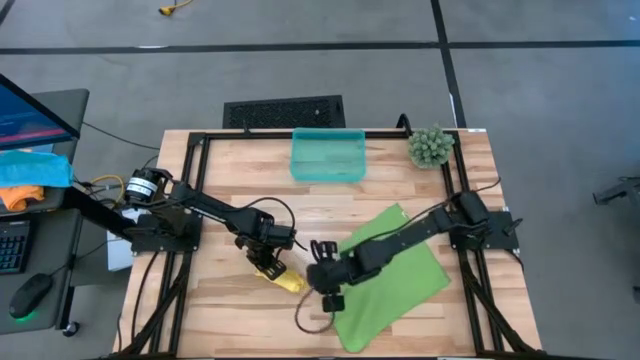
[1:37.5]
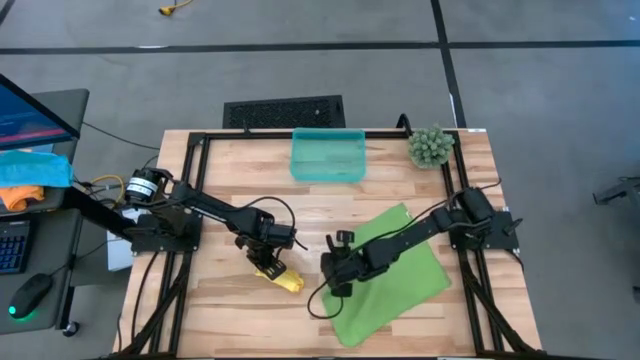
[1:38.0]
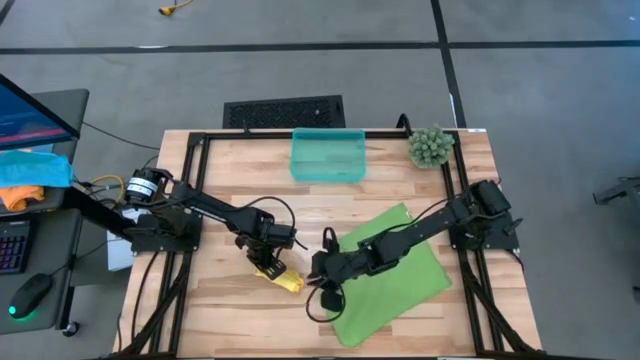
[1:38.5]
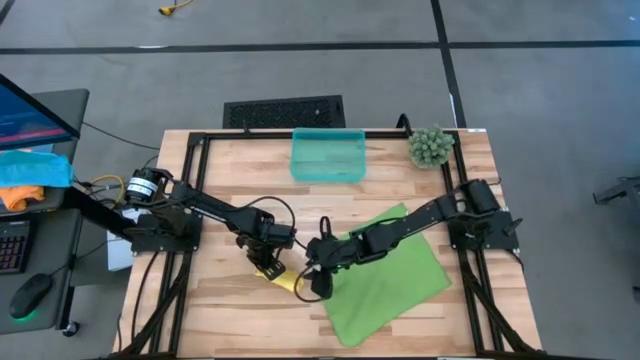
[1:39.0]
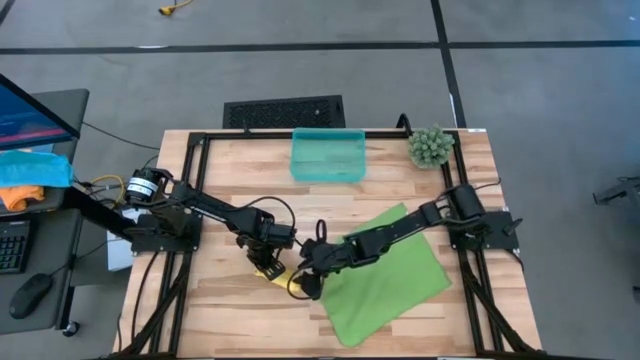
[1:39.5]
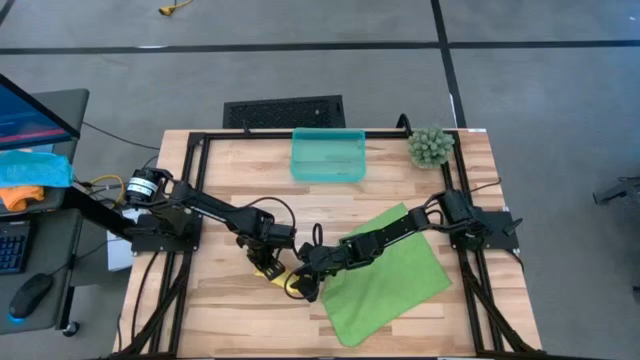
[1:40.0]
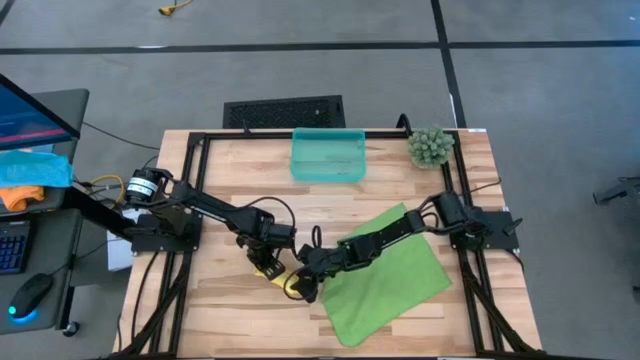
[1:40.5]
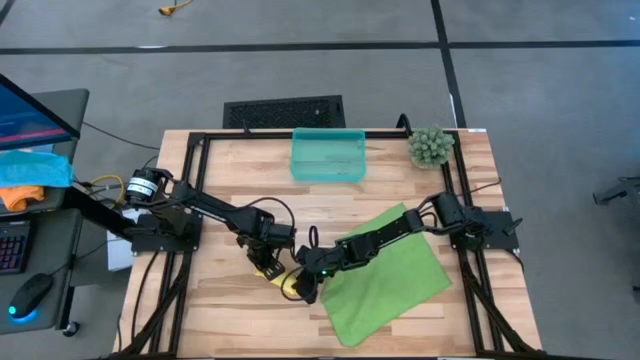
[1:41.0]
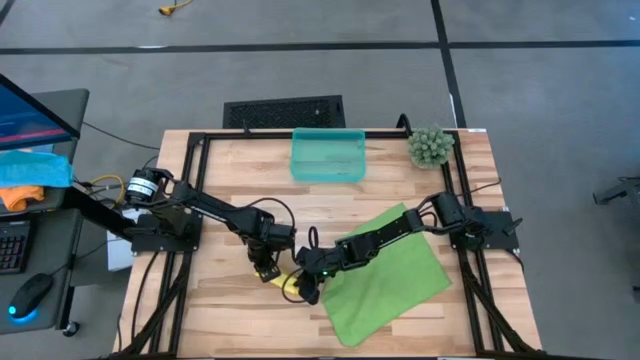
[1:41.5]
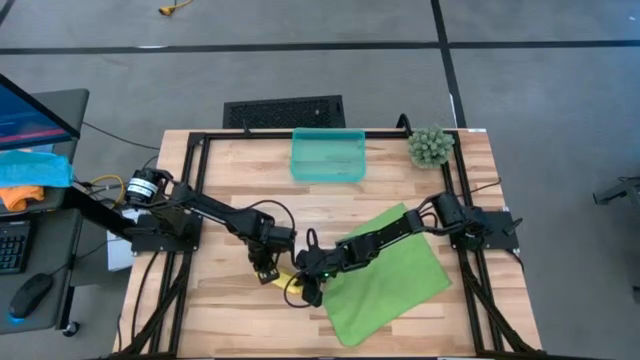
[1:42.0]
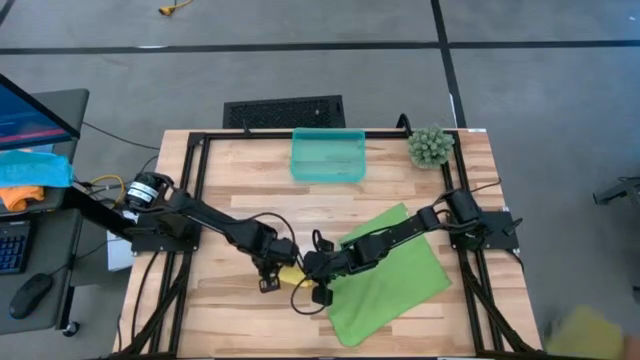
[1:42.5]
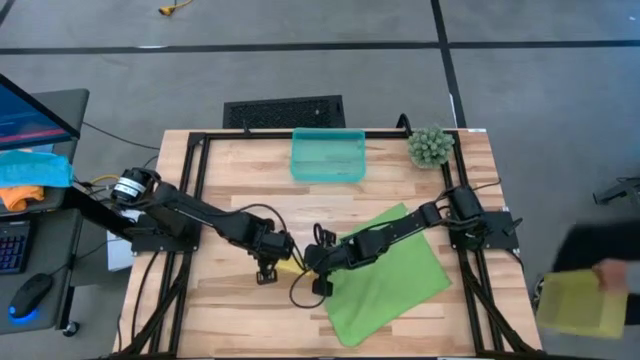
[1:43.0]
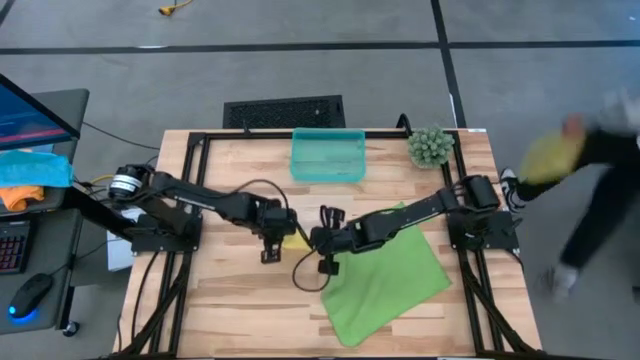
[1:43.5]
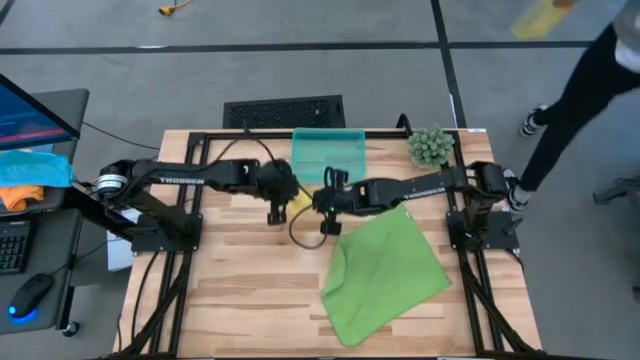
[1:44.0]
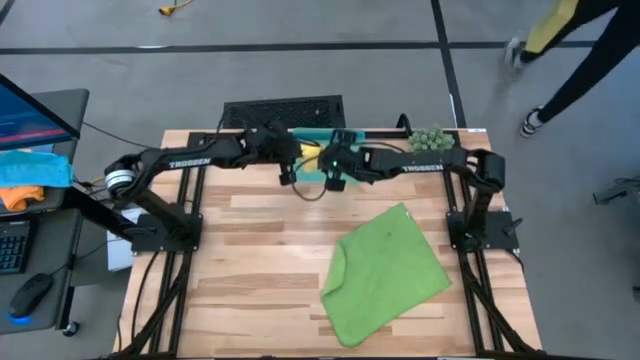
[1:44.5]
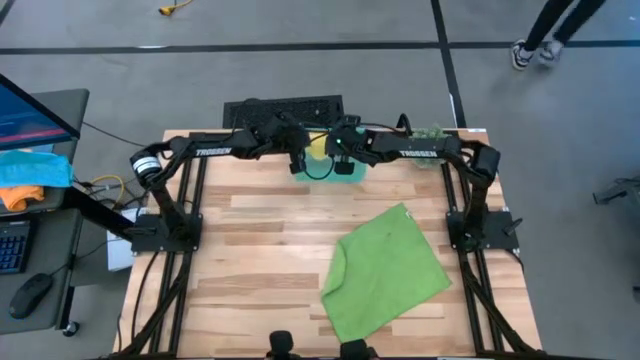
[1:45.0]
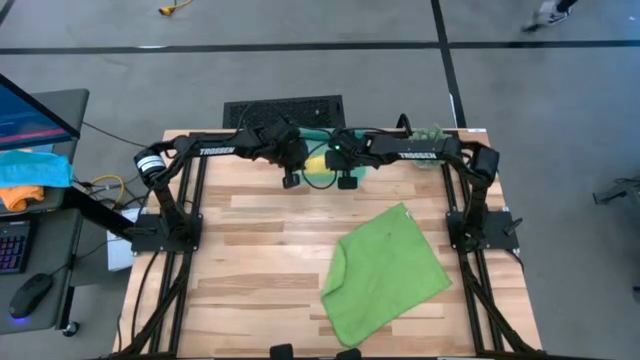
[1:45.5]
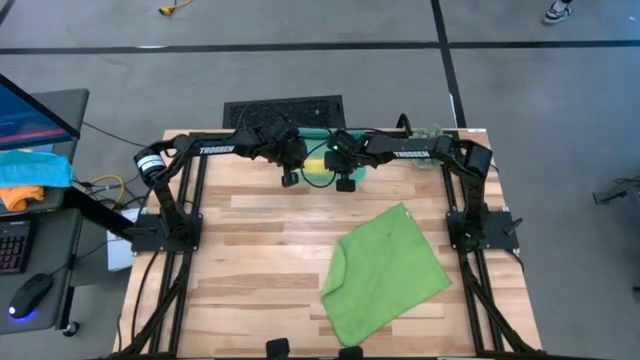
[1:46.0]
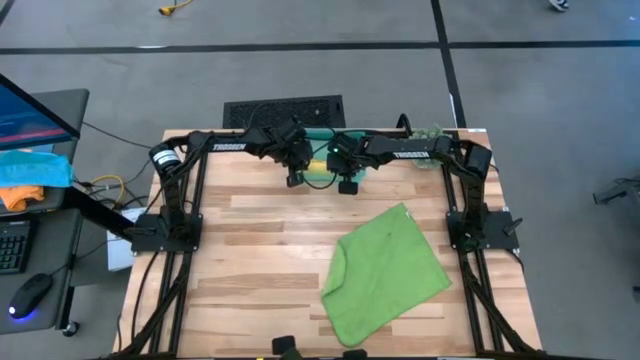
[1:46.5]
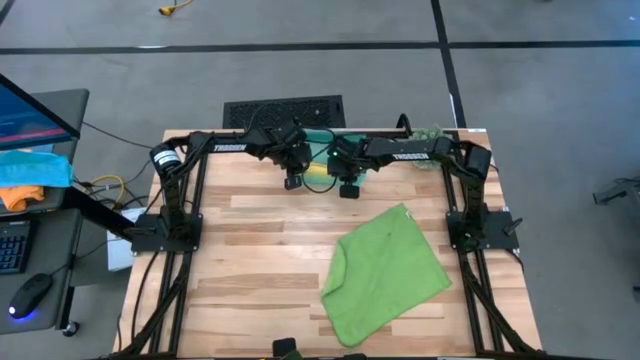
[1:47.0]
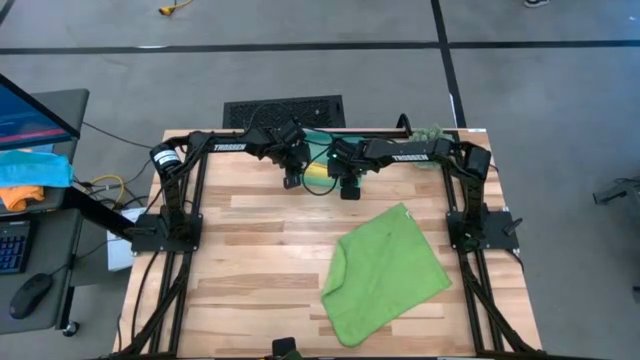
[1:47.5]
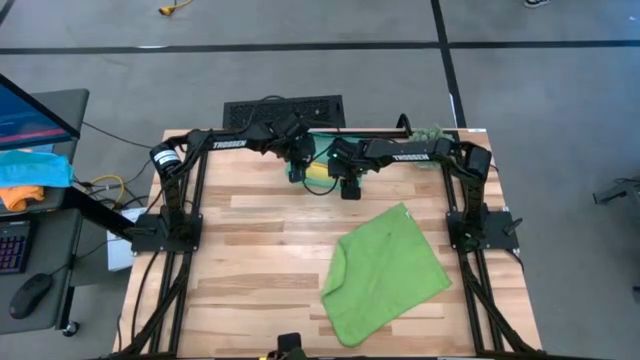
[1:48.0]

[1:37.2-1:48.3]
Task: Roll microfiber towels into tight, uniform cylinder then place into a basket
Put the yellow microfiber towel into the blue bin

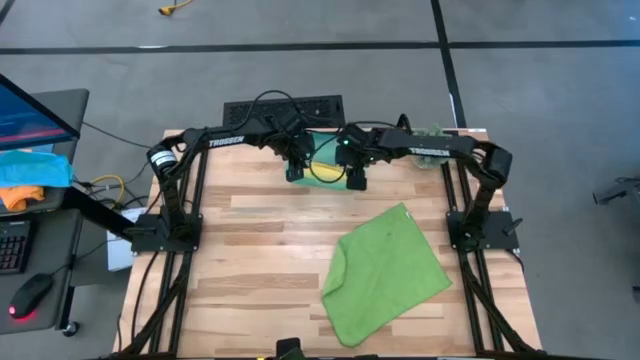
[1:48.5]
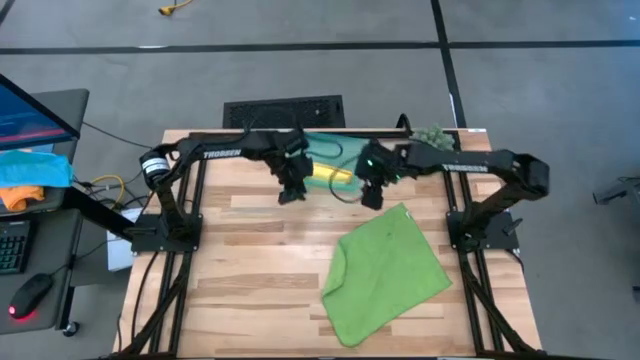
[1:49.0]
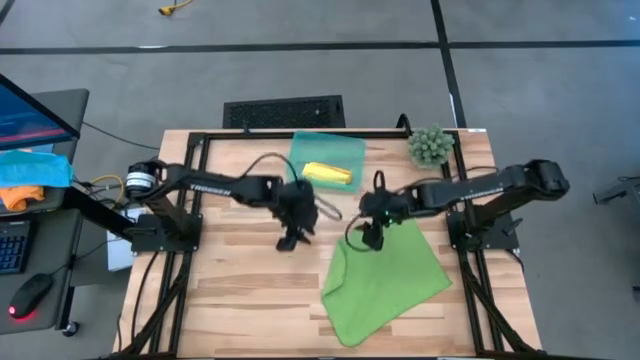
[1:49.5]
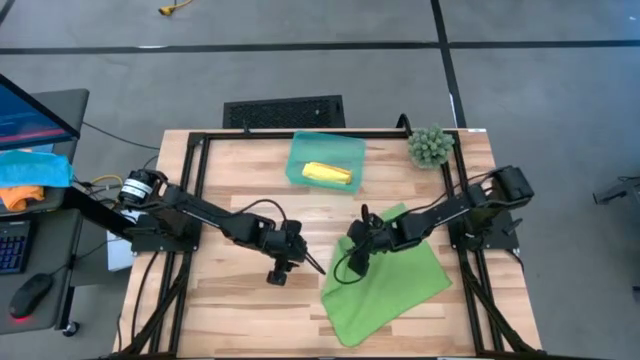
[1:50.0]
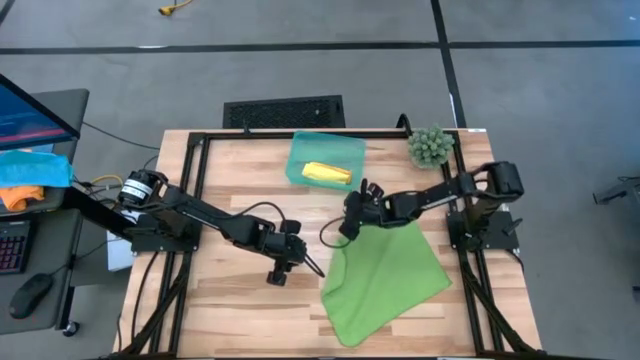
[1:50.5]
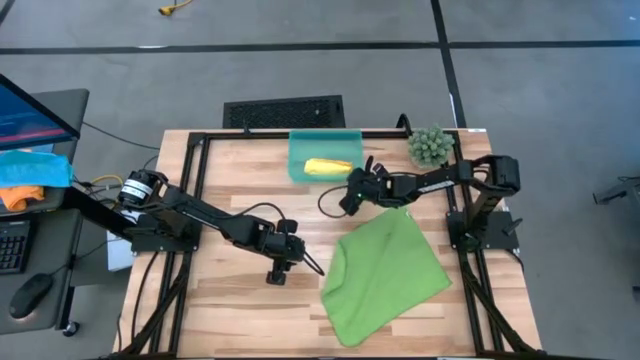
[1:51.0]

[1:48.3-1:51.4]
Adjust the blue bin

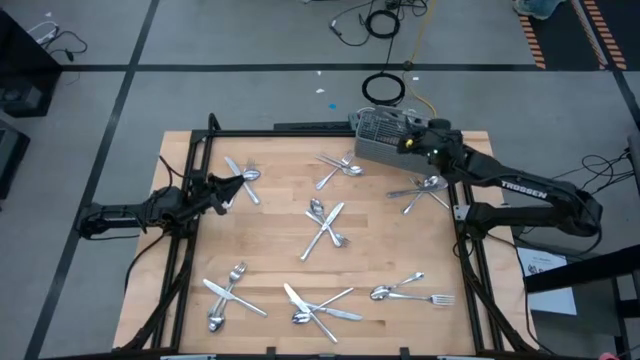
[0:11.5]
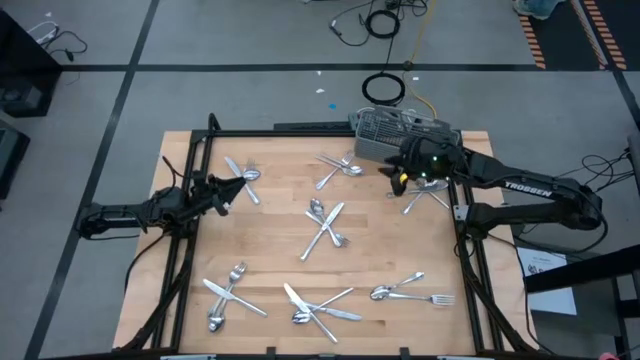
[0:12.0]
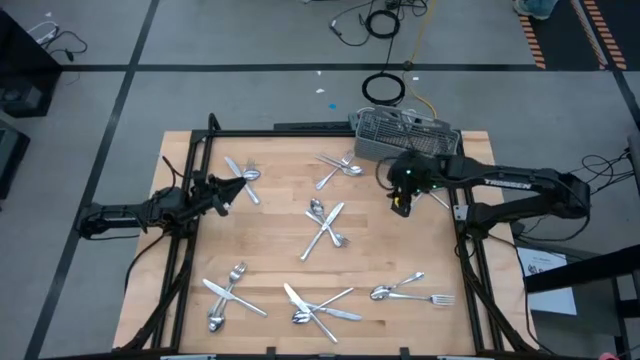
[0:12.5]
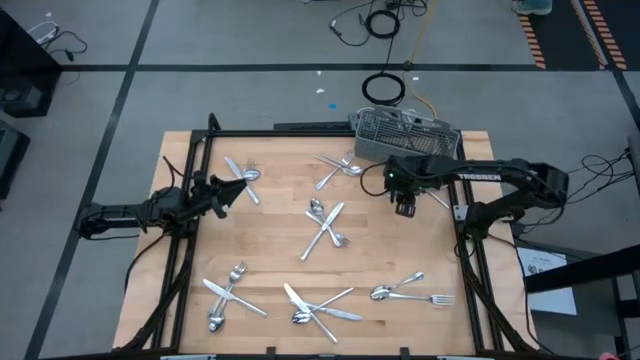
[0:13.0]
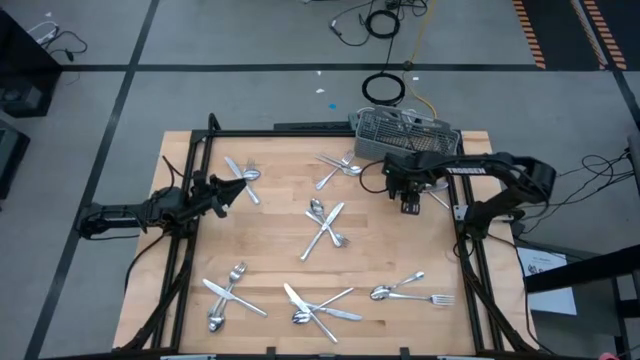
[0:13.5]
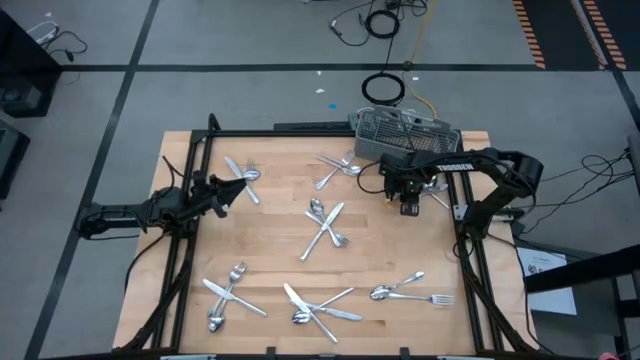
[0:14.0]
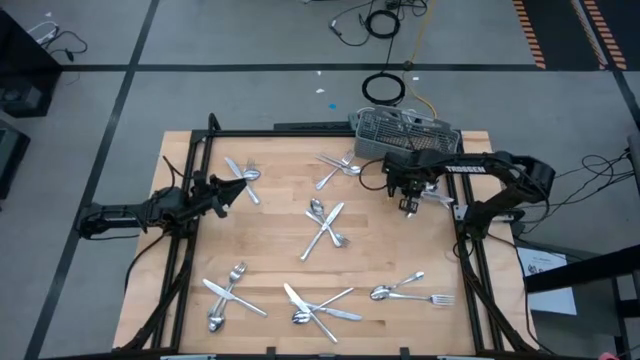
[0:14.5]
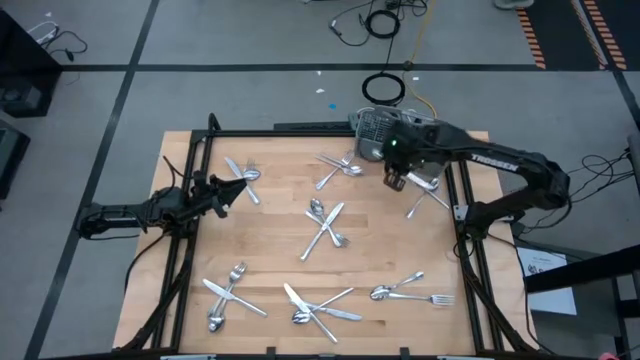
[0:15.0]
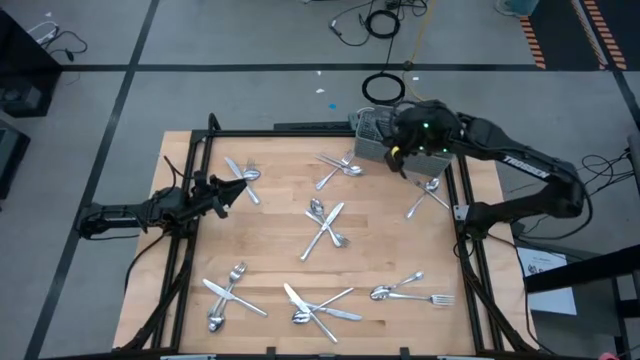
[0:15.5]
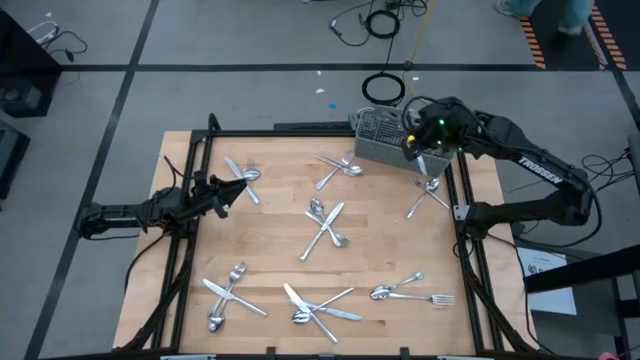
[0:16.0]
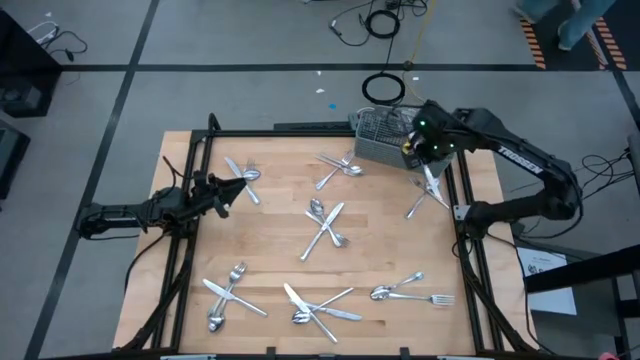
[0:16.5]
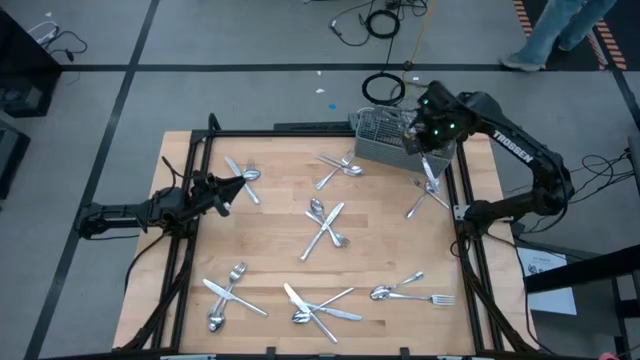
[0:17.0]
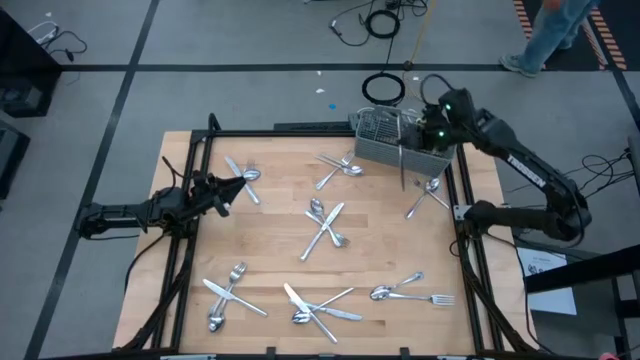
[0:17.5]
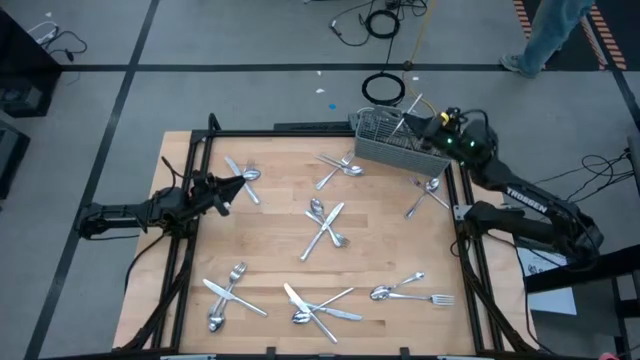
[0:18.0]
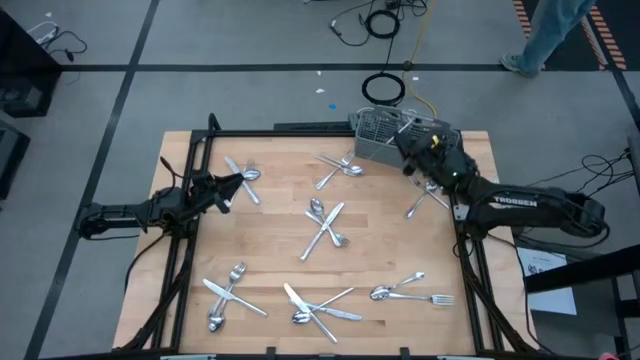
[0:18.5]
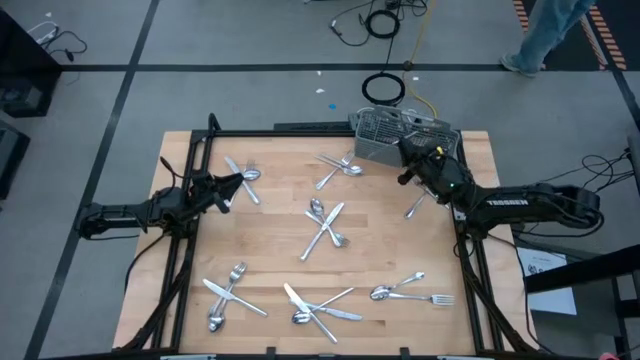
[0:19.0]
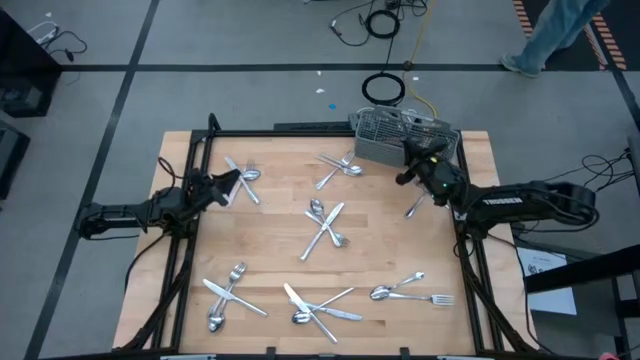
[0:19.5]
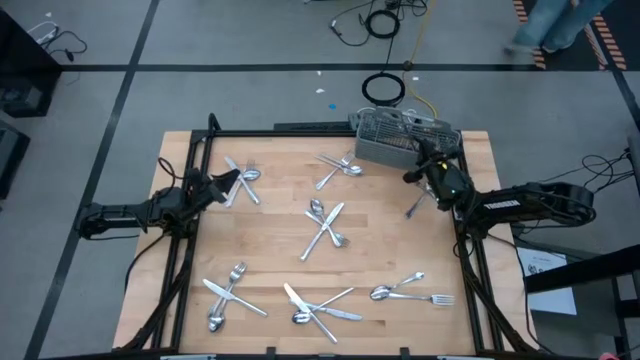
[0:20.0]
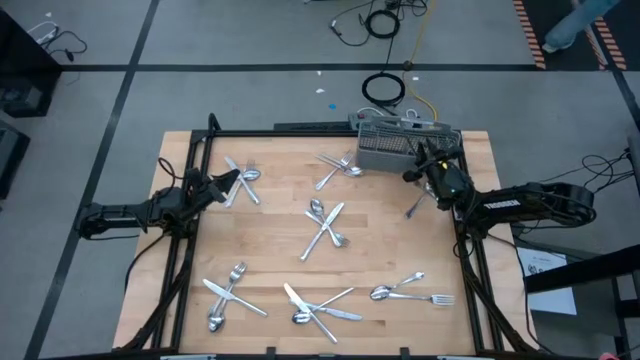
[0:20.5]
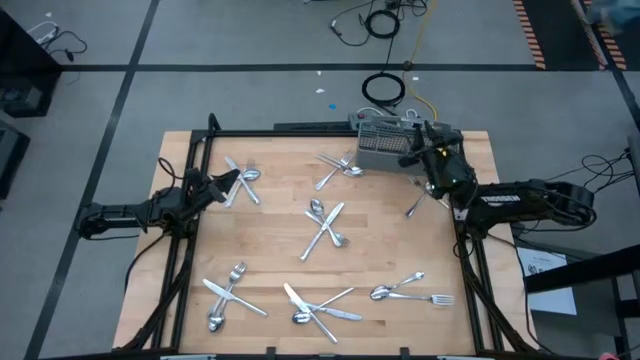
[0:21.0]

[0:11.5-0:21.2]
Task: Sort silverware
Put the silver table knife into the gray utensil holder
